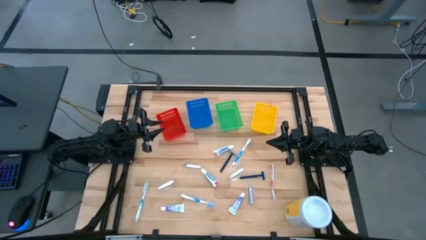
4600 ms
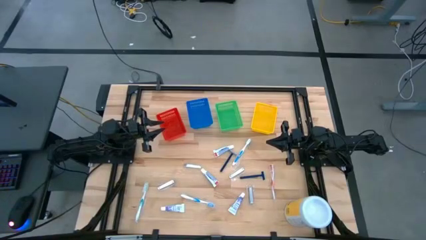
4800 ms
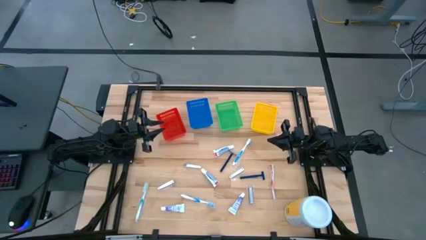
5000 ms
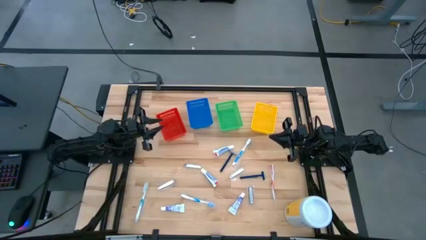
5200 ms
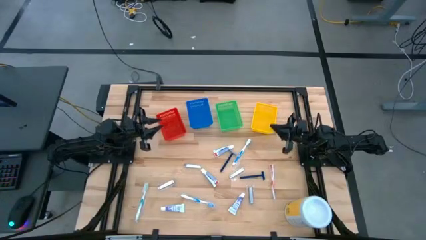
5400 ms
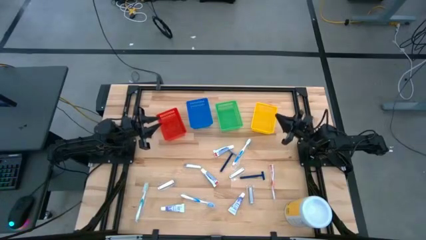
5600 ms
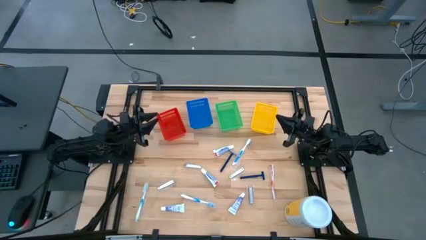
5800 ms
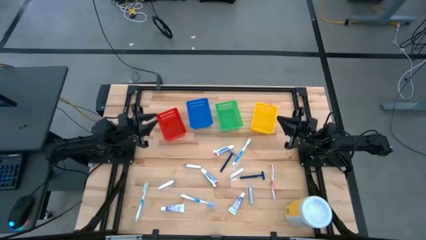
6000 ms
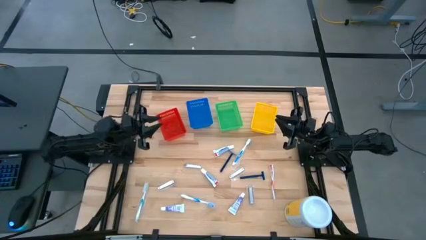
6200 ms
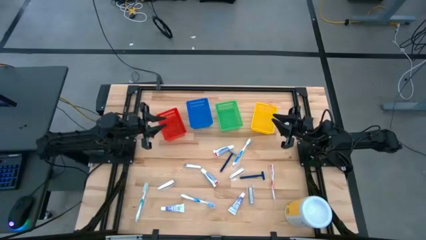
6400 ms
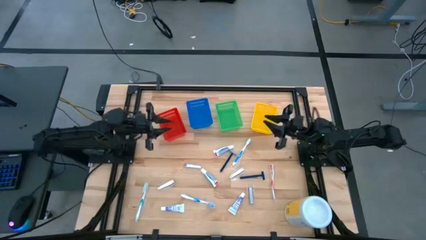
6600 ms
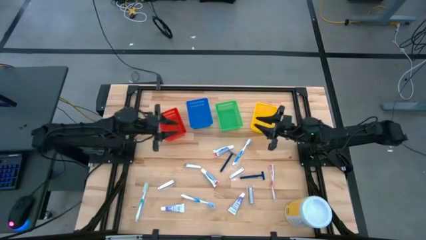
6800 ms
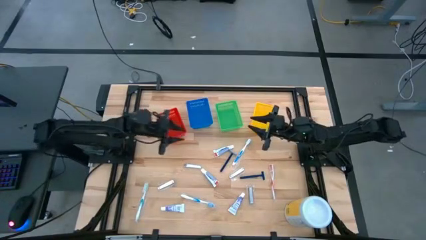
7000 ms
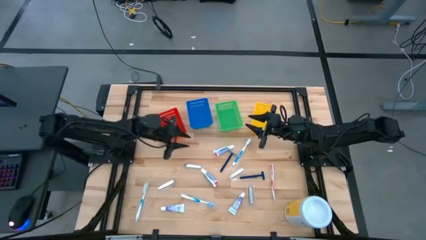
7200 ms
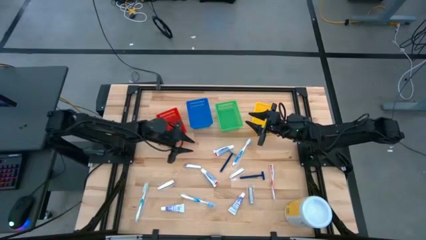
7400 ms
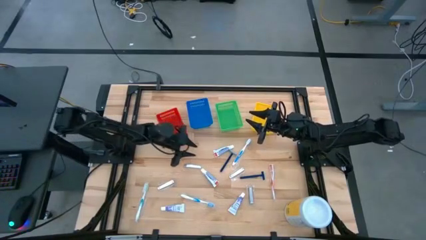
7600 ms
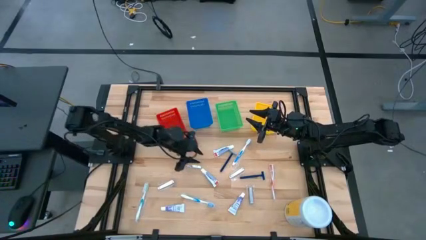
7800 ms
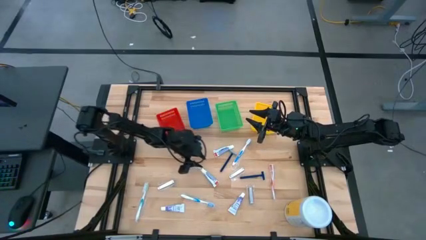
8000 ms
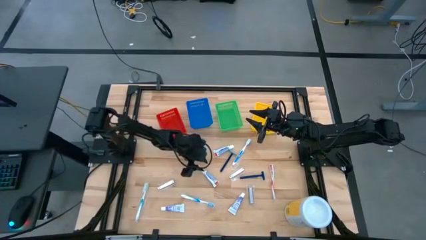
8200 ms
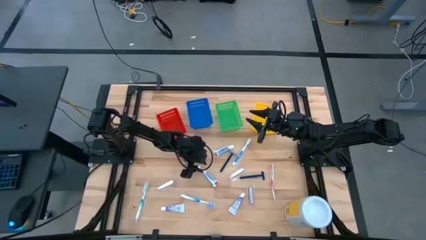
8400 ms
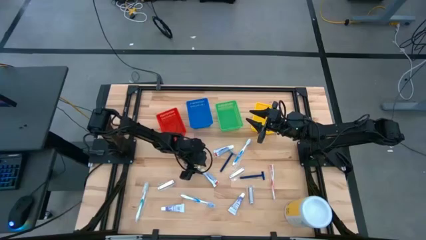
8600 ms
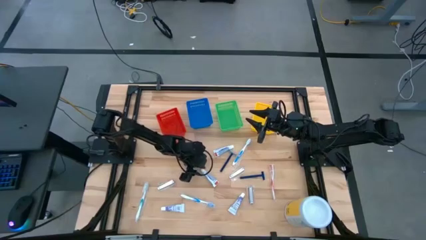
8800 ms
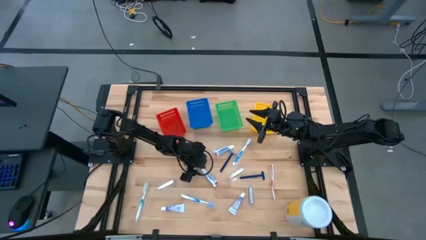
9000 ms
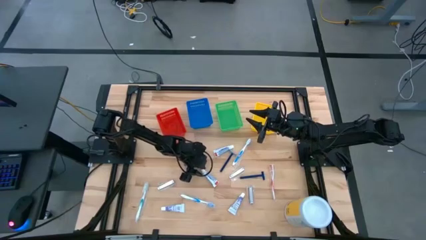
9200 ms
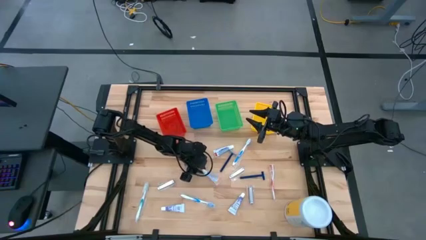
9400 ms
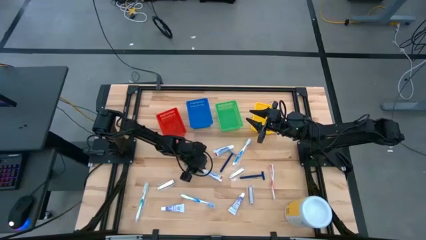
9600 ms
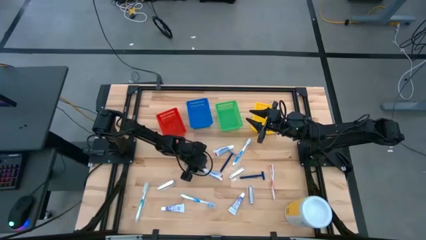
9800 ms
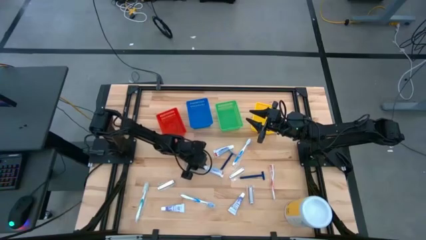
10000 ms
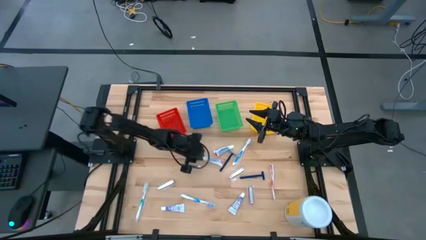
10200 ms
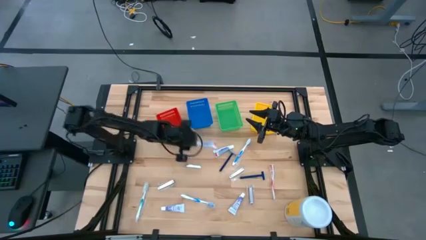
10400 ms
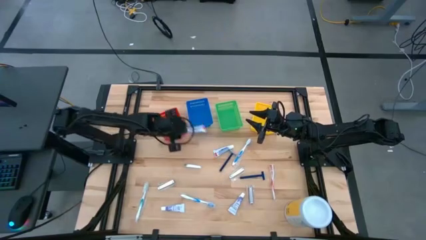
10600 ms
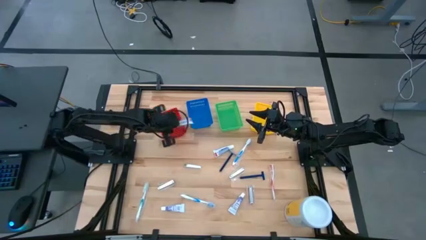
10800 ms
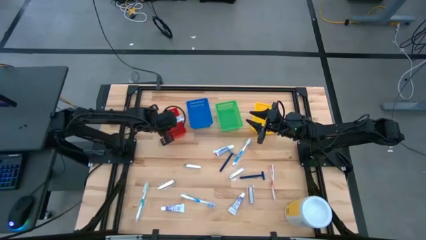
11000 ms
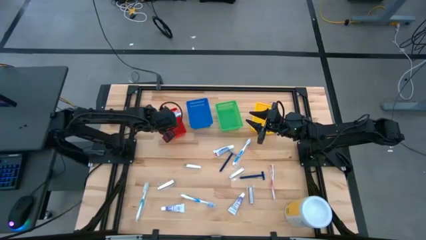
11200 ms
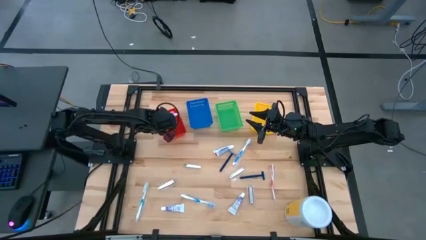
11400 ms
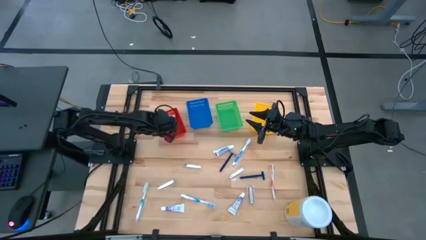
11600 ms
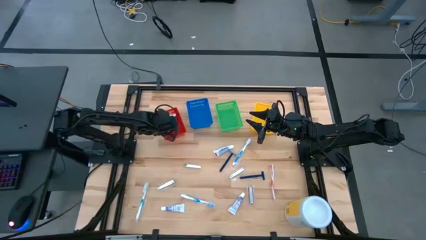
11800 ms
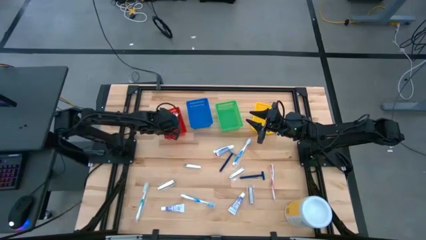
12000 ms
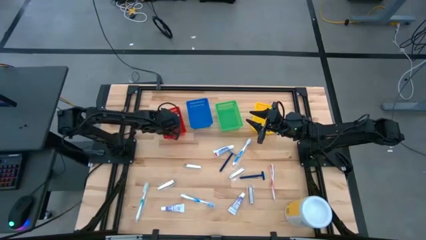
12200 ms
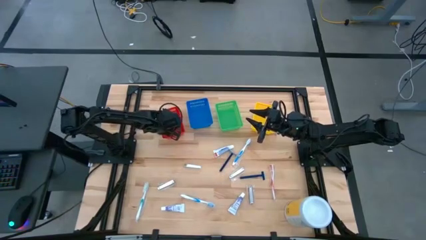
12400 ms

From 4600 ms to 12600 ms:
Task: Pick & Place Travel size toiletries
Put the toothpaste into the red bin

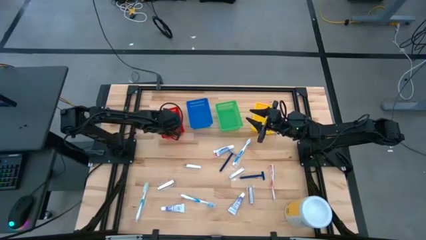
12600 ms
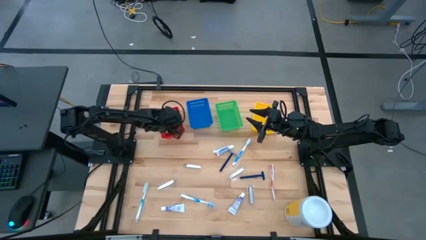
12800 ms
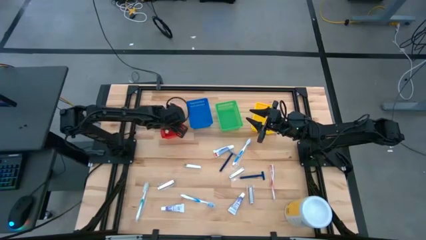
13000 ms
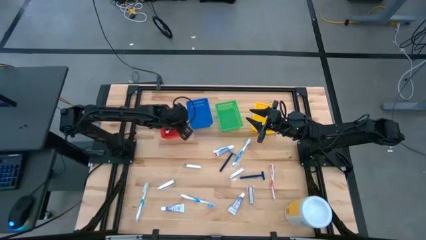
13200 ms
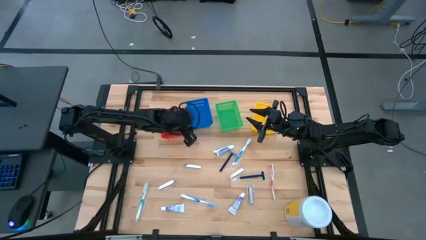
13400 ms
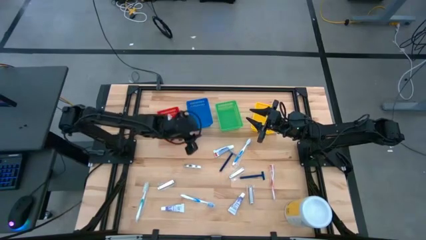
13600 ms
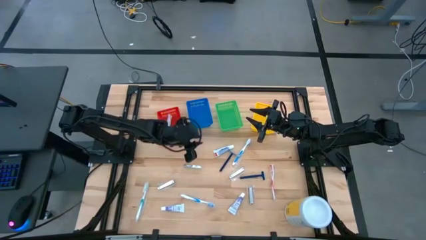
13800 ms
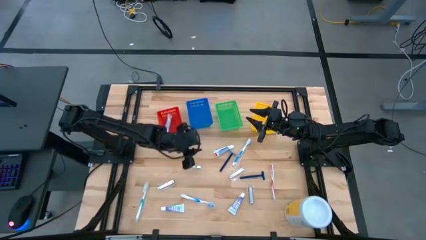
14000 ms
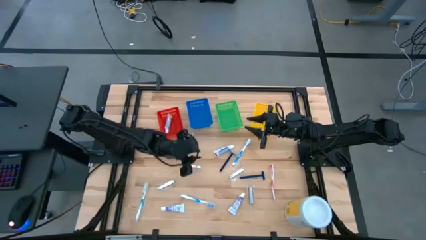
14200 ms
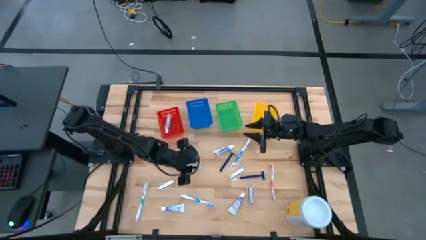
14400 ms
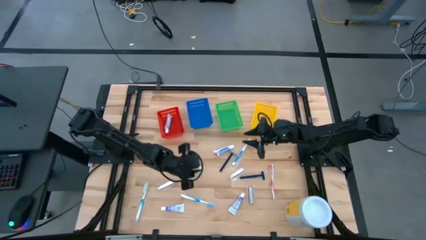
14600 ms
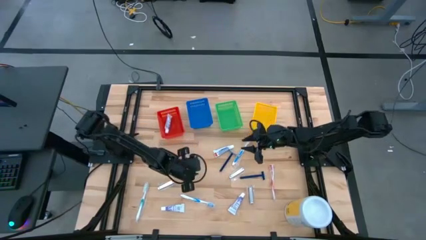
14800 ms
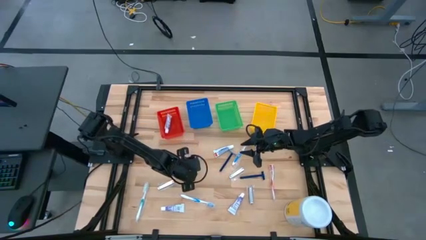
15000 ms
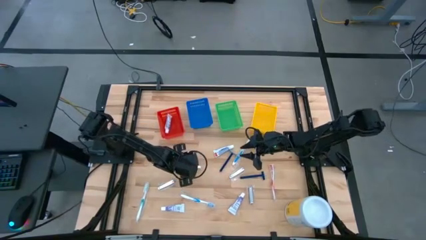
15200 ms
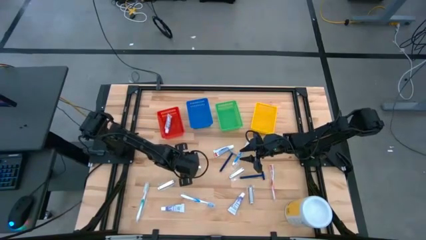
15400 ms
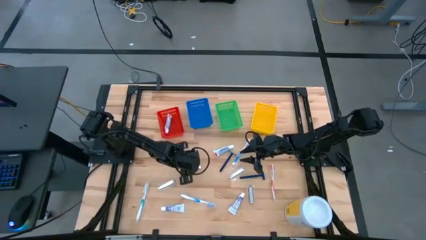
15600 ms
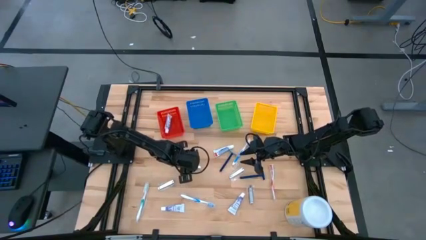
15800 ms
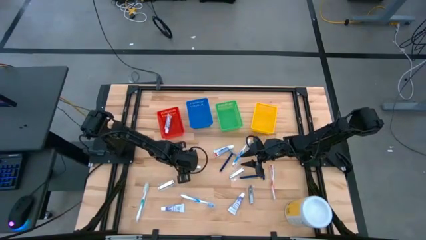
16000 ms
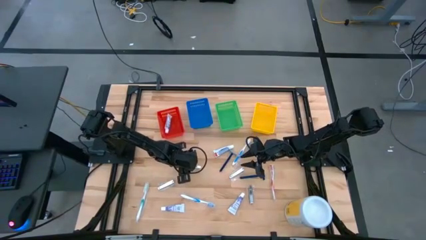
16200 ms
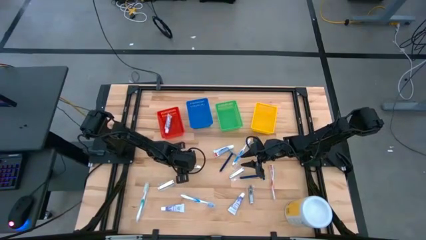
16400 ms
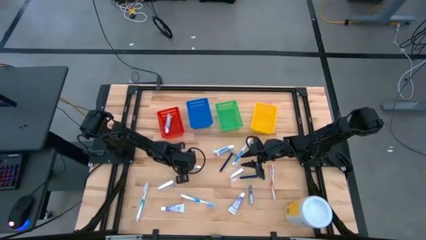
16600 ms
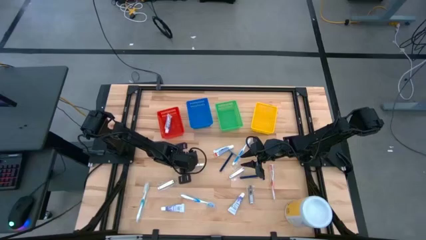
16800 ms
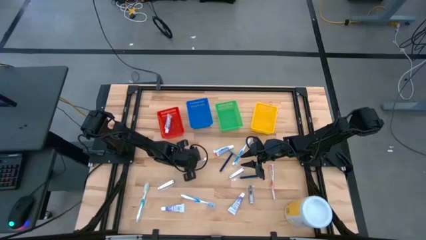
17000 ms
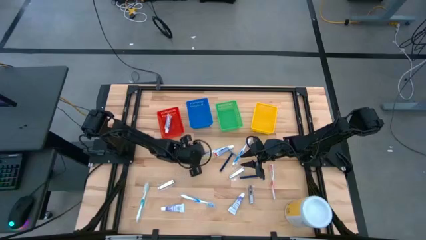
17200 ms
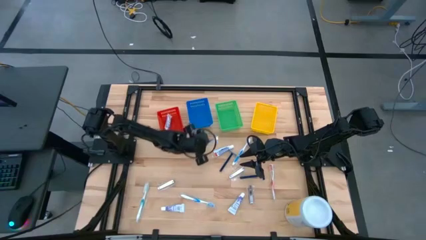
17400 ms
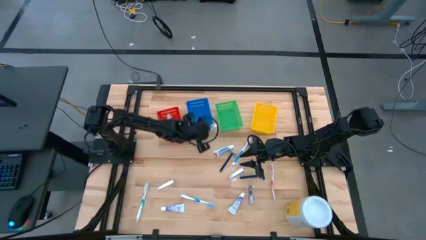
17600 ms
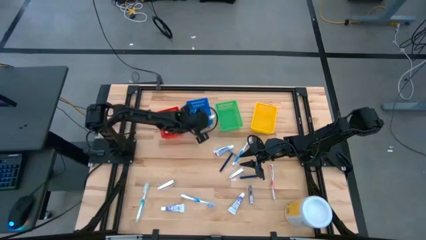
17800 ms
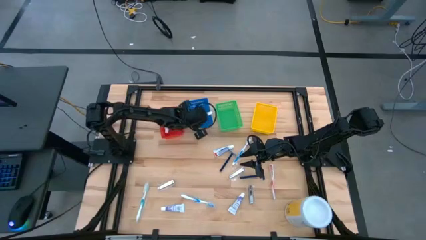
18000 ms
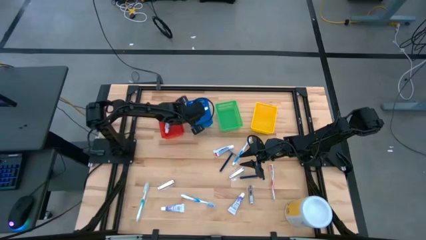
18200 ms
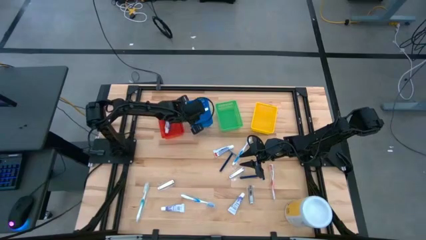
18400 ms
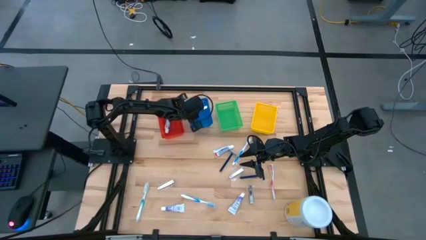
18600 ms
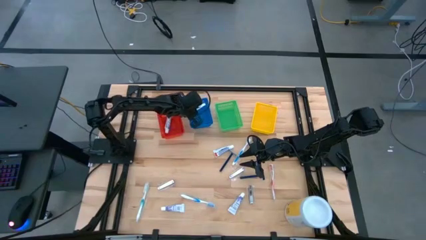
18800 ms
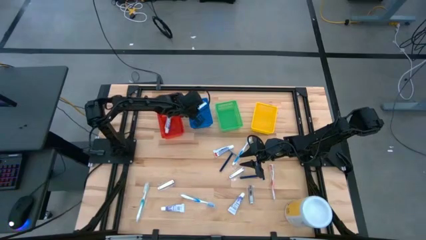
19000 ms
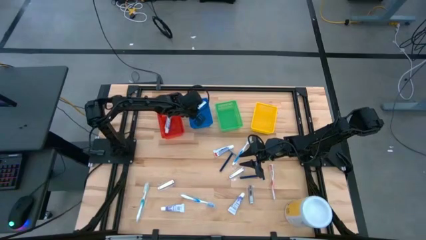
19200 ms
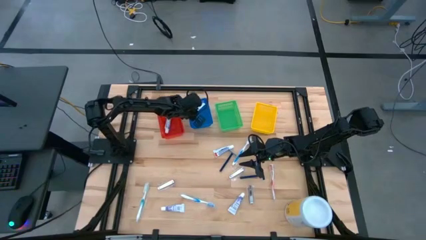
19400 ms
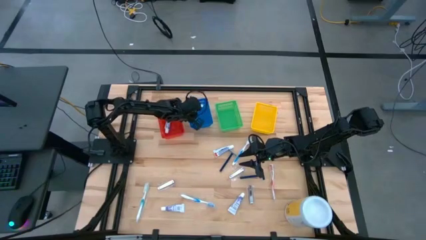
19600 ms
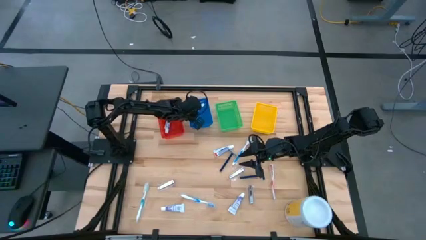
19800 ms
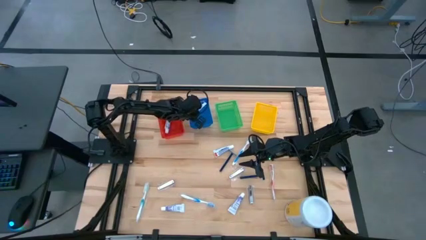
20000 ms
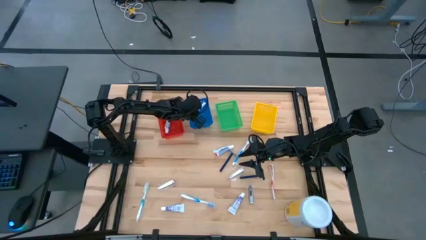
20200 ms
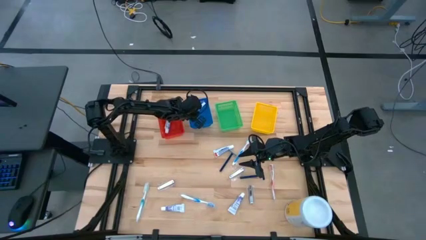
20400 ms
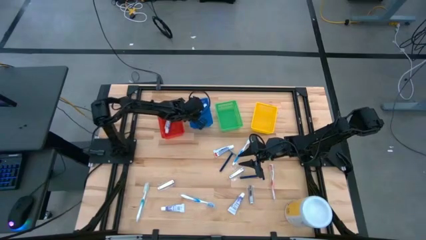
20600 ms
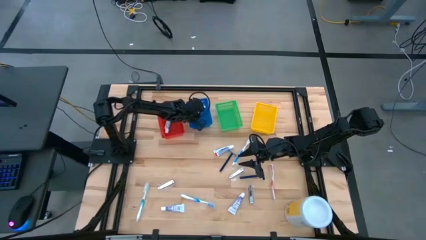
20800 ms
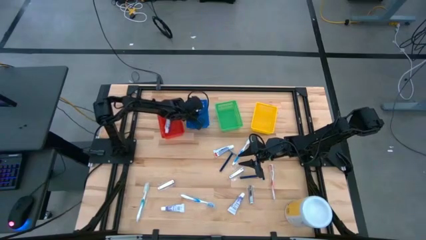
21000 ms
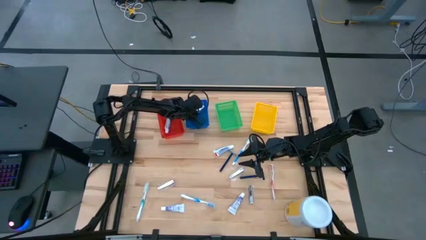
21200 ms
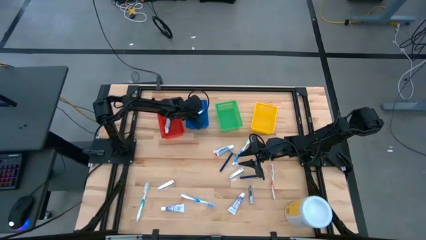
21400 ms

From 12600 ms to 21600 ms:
Put the nail cutter into the blue bin
